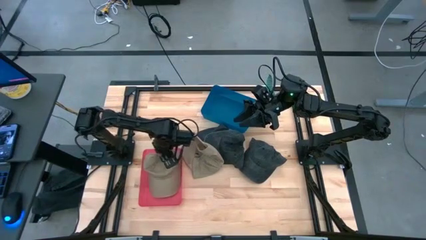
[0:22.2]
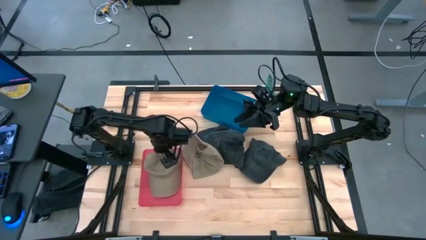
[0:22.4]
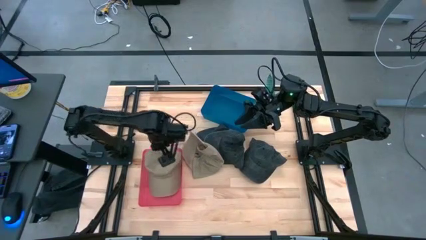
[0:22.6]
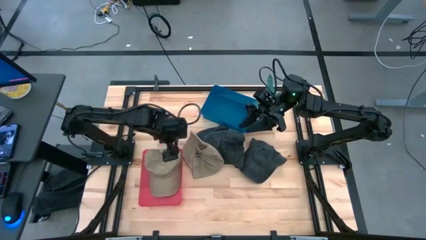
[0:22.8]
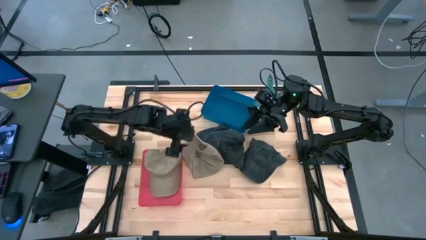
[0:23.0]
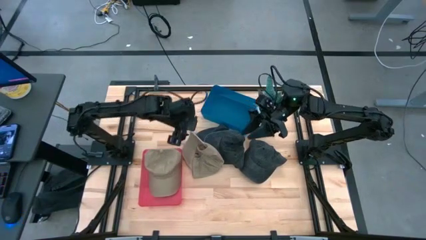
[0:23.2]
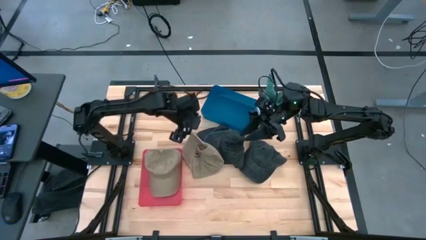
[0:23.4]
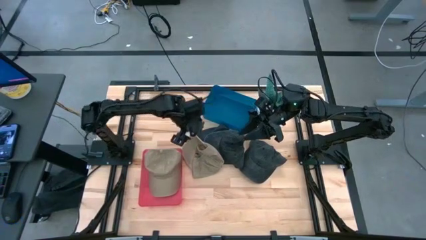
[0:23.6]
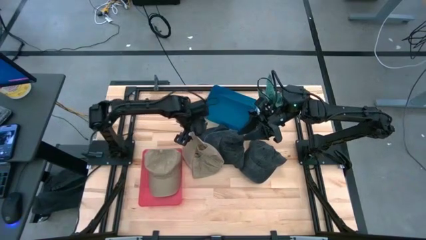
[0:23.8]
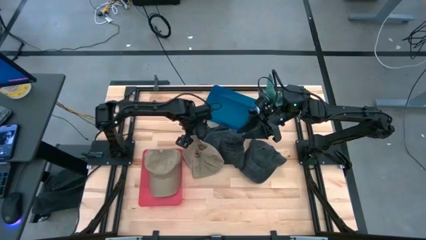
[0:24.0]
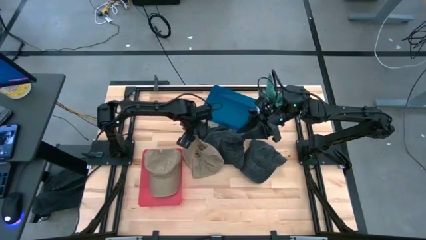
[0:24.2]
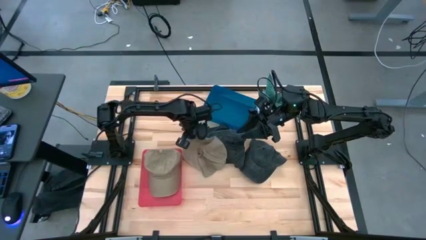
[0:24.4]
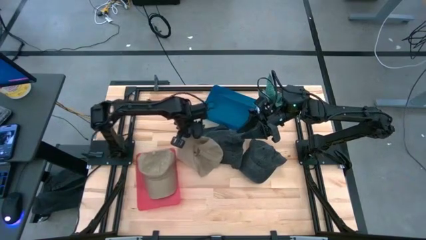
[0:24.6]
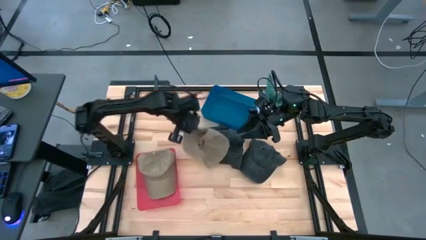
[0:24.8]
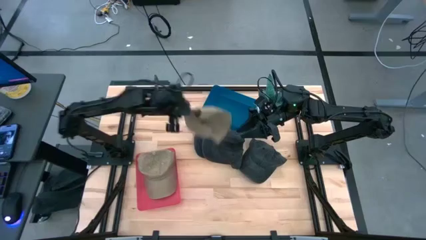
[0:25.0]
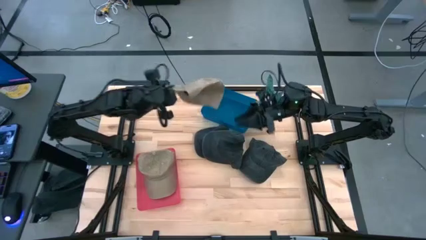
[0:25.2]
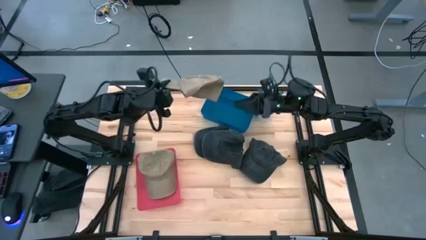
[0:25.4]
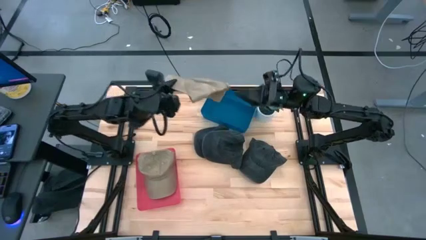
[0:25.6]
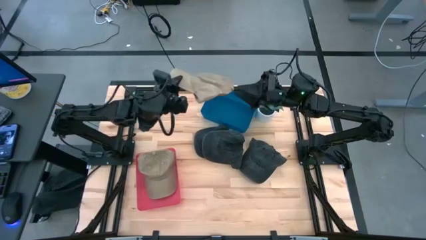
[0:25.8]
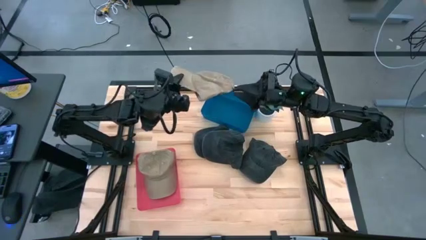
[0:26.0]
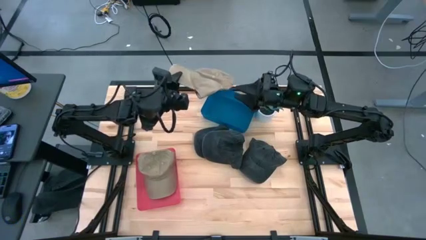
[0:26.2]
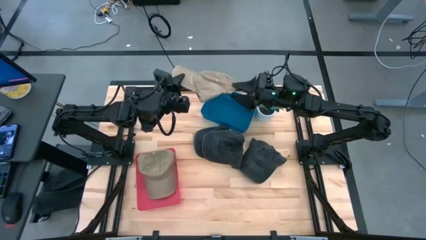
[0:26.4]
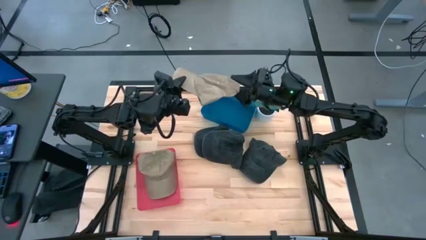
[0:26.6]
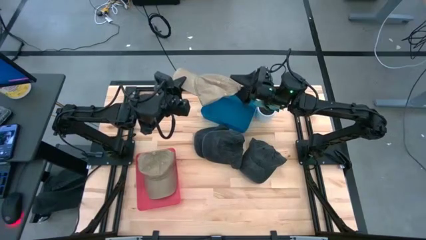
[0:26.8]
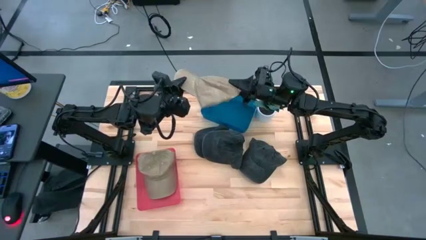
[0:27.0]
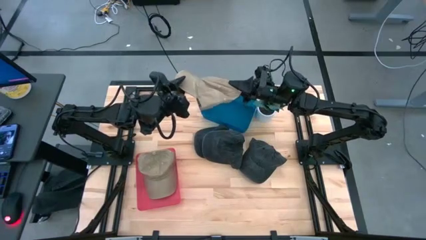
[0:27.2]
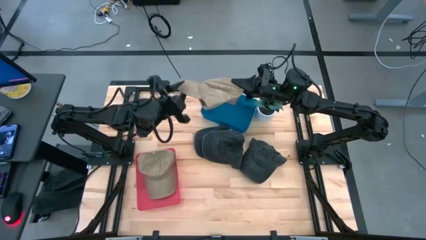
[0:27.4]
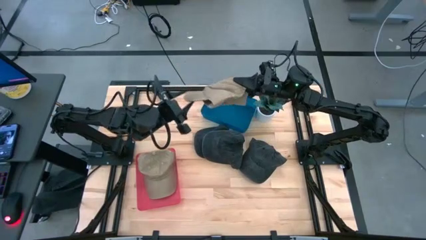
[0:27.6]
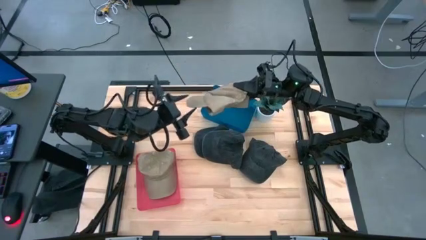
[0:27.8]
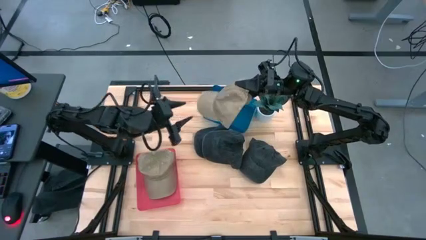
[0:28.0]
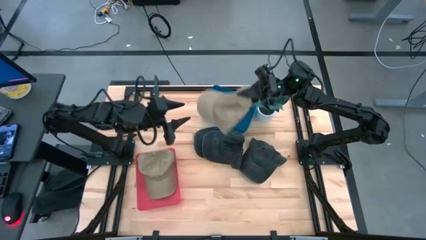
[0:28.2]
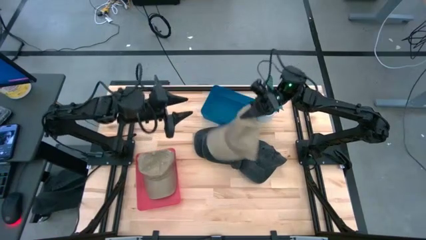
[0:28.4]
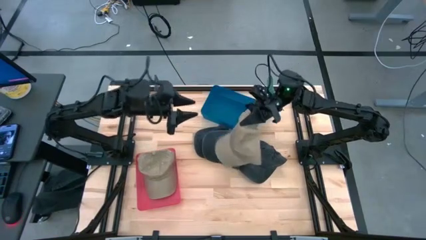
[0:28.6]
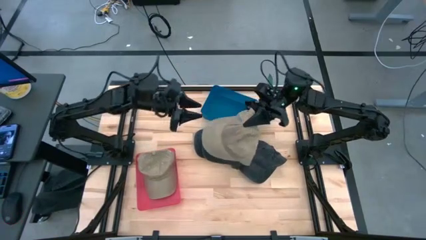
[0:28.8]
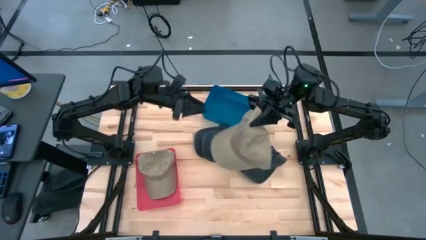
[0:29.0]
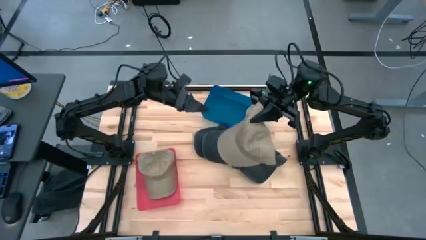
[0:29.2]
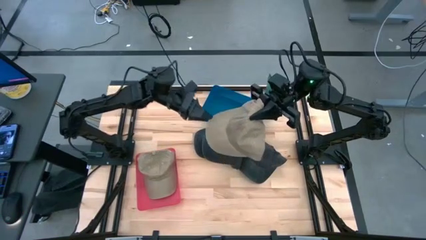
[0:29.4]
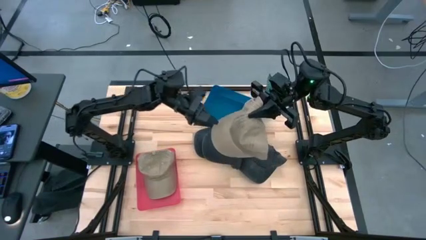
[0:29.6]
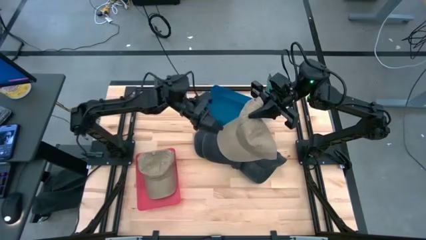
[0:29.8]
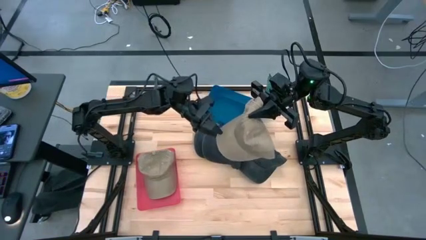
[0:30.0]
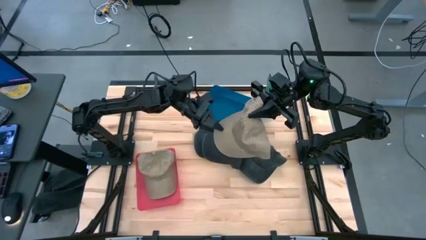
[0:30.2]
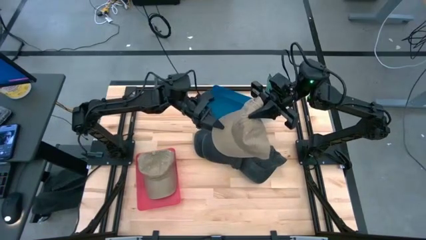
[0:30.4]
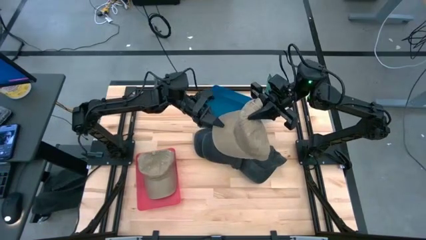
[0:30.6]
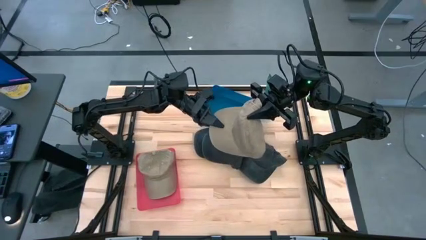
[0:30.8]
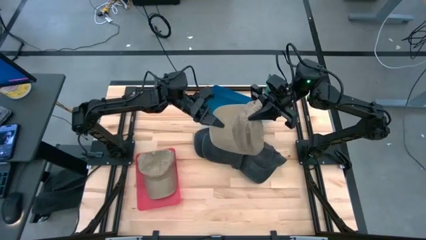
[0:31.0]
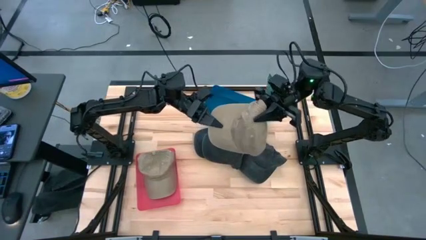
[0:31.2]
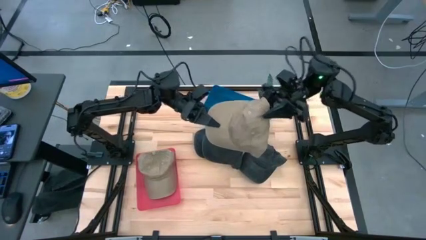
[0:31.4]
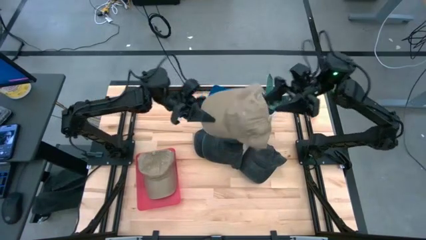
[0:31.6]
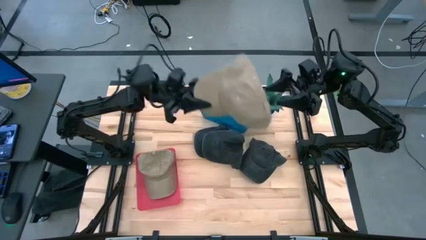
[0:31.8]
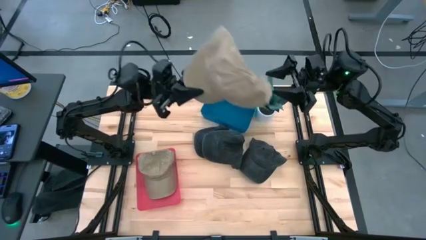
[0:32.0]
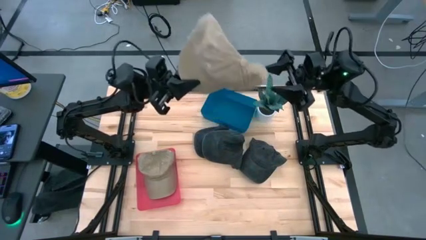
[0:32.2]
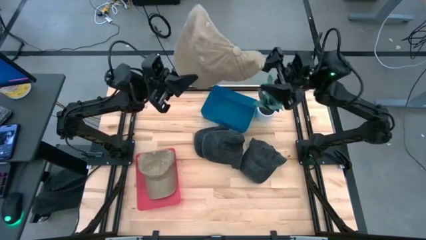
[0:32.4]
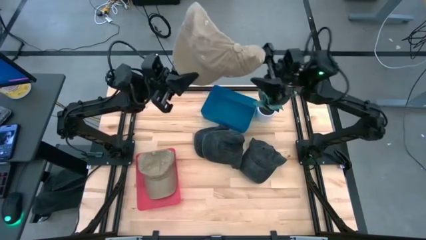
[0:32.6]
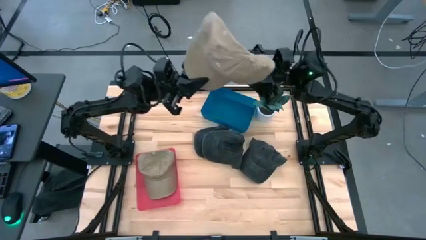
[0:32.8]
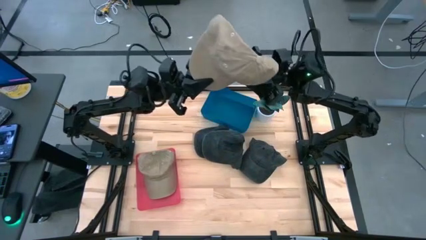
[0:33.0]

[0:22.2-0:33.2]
Task: Pick & Place hat
Put the brown cap into the red bin

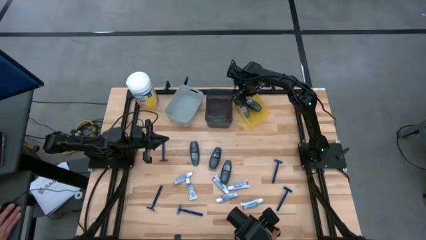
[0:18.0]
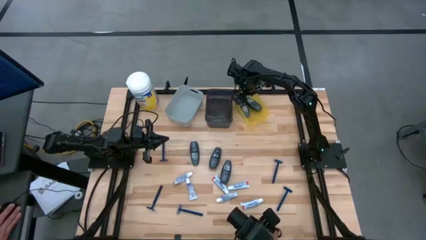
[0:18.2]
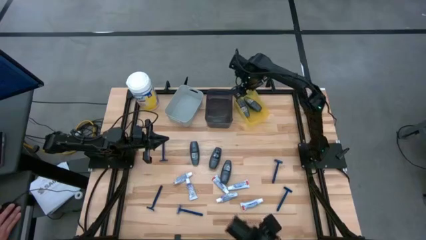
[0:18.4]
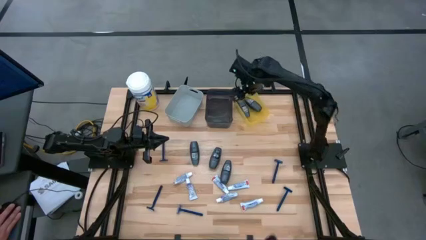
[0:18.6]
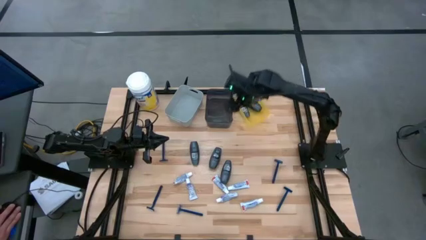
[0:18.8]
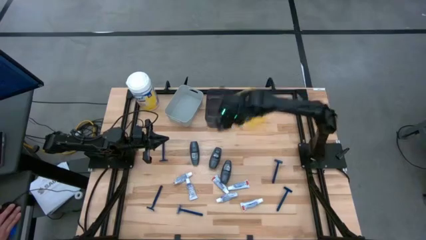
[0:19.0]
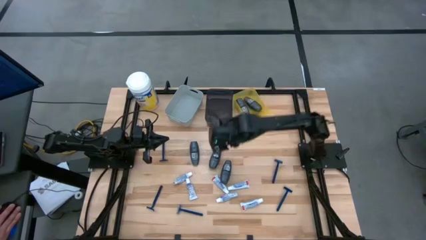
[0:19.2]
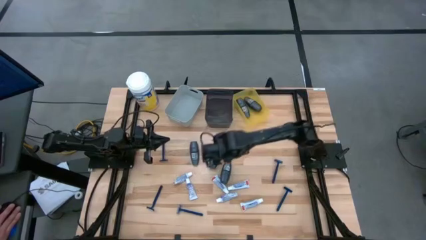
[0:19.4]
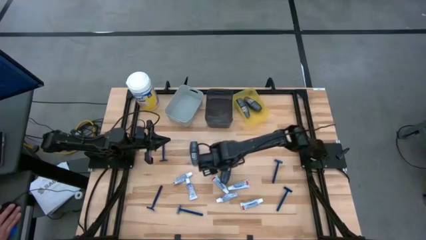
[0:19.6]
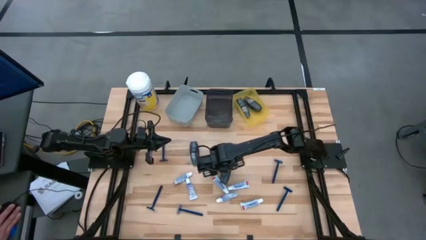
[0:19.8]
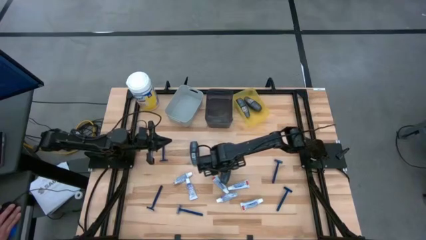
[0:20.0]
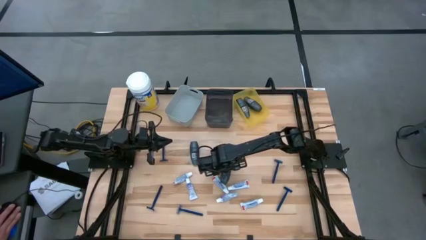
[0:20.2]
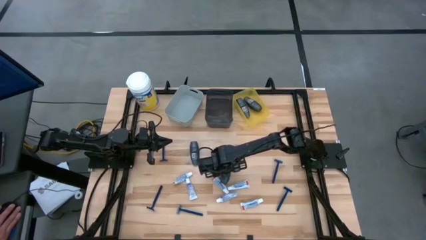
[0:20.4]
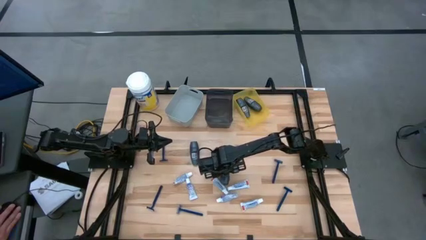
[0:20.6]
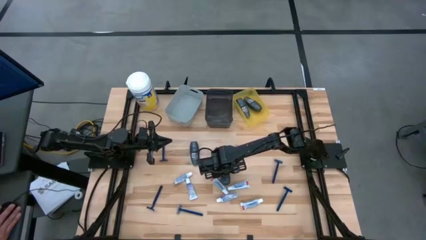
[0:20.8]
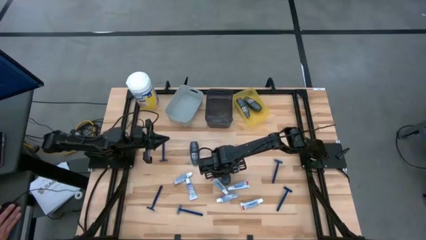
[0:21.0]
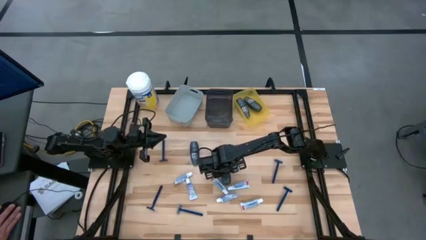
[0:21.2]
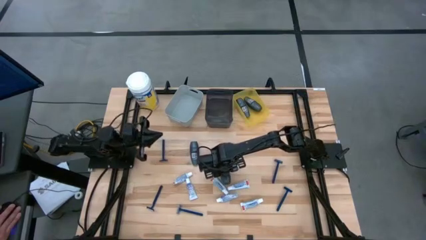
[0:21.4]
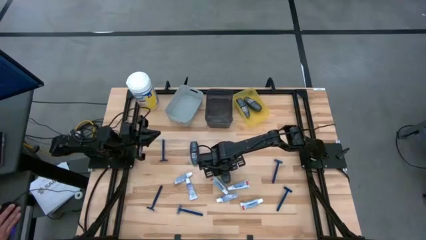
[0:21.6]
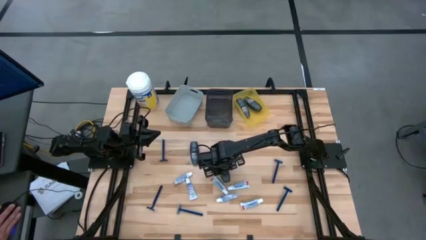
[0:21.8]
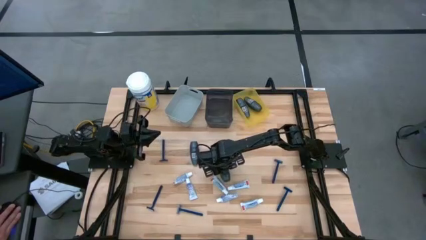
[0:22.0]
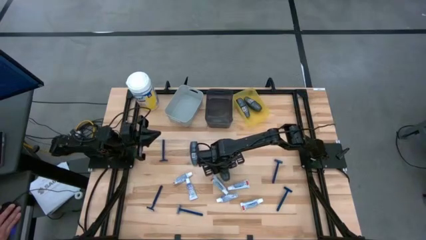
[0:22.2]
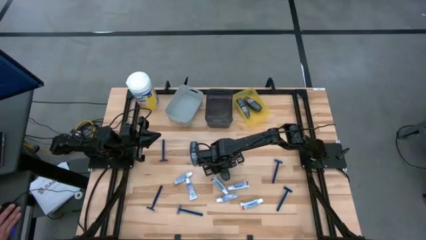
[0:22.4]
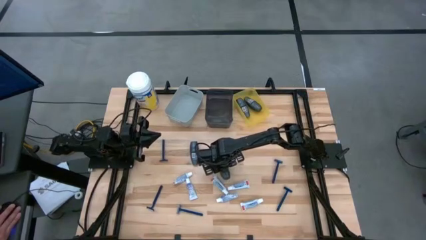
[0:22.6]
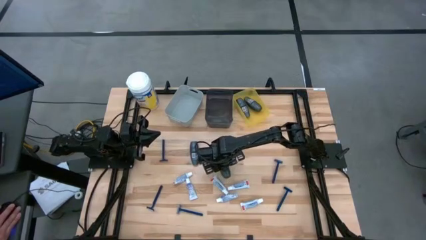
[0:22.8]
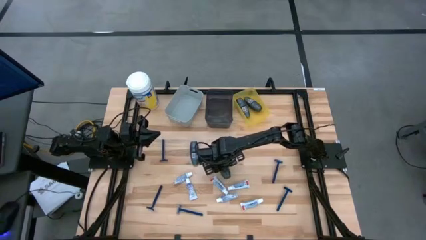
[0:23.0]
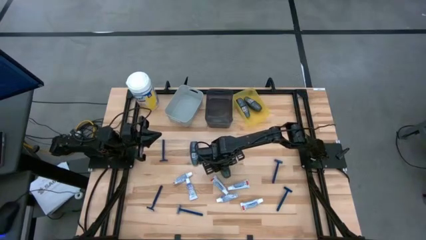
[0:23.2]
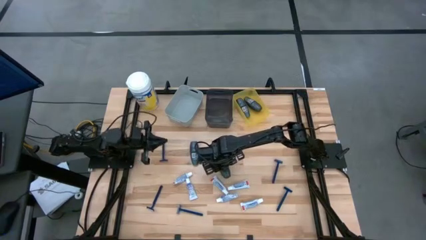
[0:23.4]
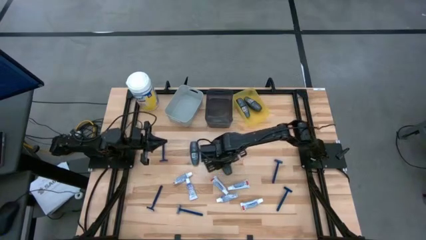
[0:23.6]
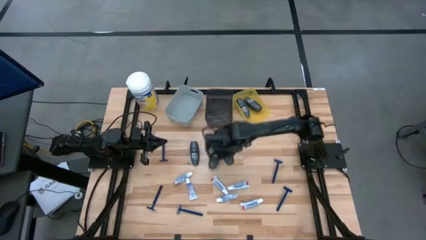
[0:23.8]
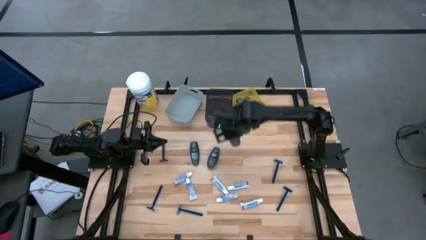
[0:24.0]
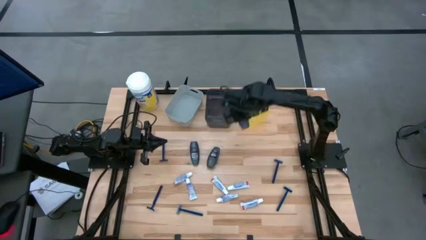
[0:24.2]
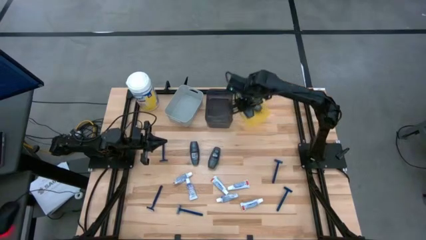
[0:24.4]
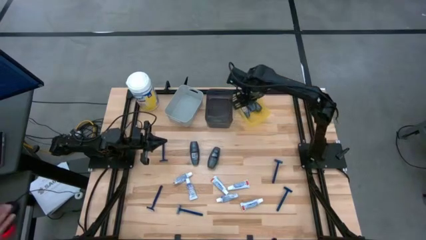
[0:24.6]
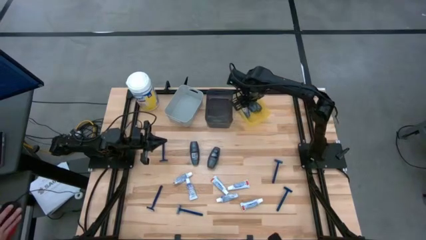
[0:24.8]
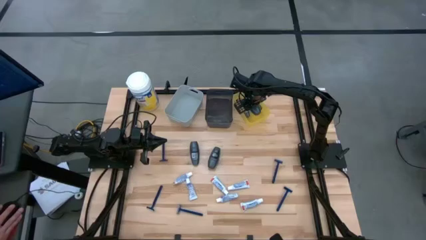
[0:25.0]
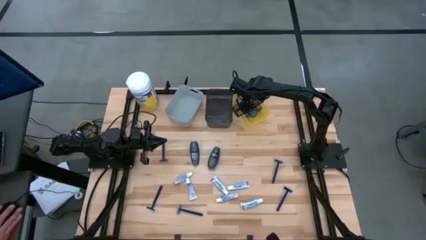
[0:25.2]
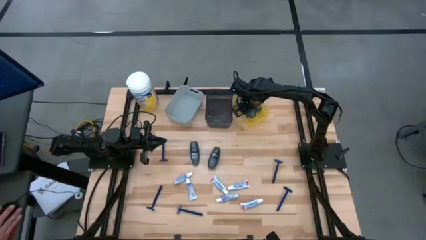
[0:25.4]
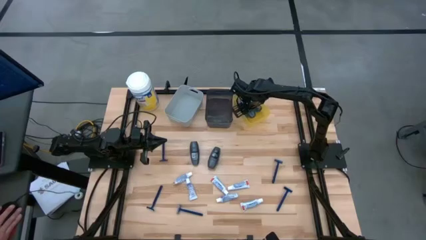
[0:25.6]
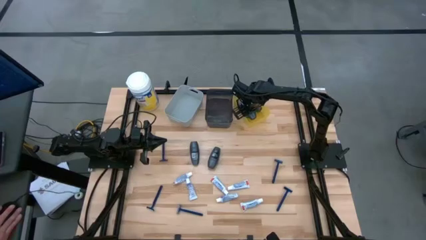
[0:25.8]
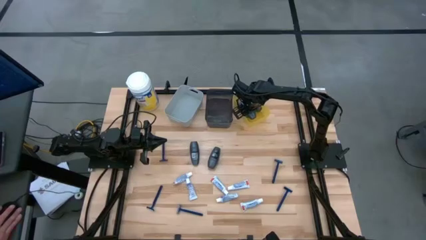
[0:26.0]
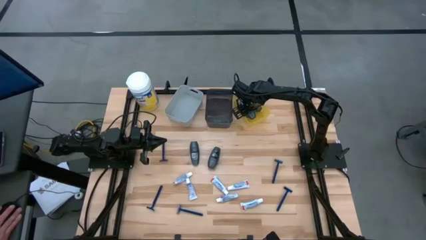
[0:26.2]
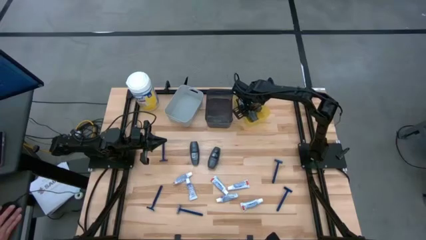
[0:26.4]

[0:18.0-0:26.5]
Task: Pick & Place Travel size toiletries
Put the deodorant into the yellow bin
